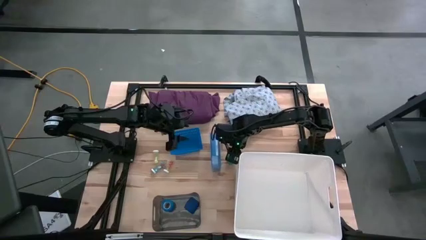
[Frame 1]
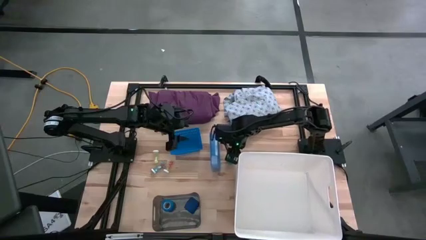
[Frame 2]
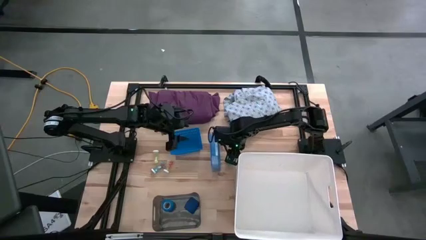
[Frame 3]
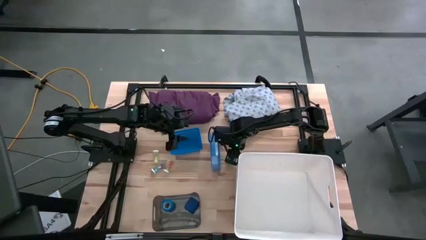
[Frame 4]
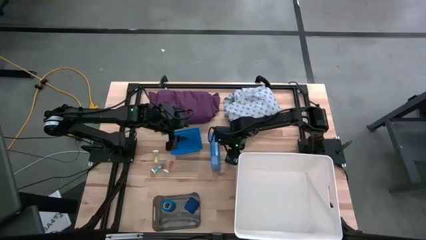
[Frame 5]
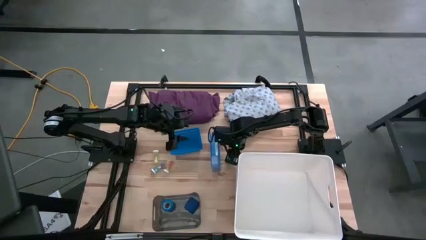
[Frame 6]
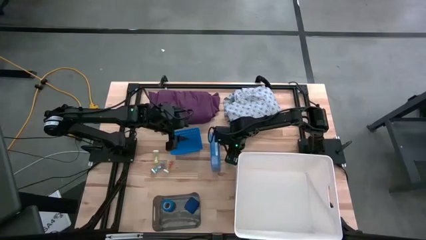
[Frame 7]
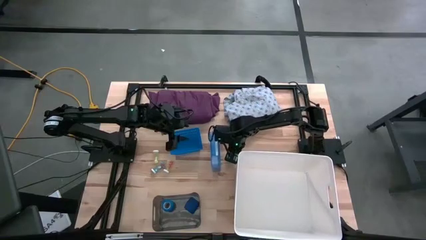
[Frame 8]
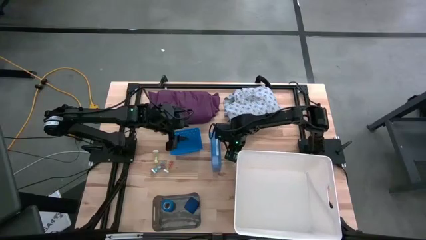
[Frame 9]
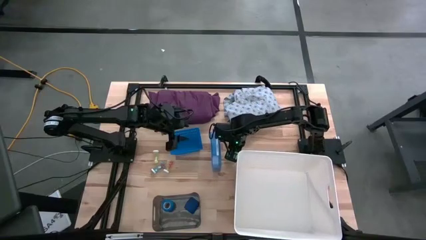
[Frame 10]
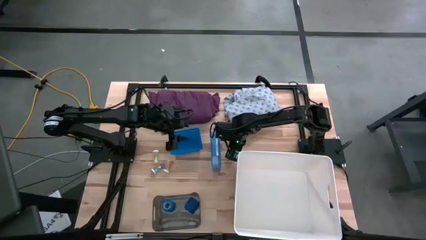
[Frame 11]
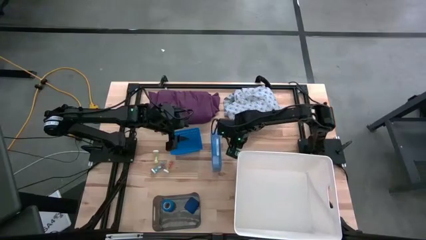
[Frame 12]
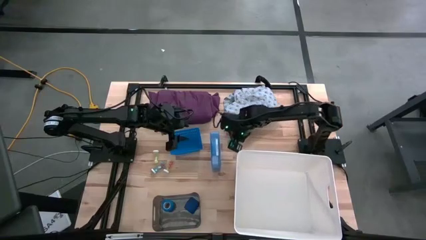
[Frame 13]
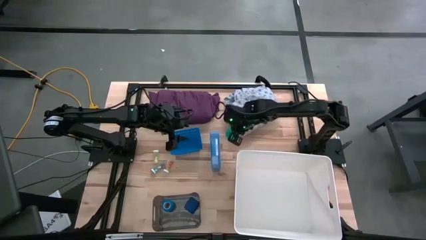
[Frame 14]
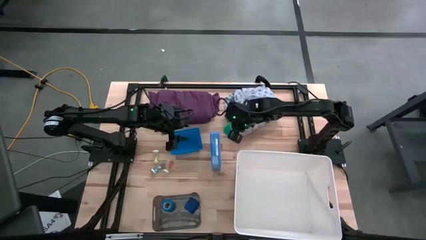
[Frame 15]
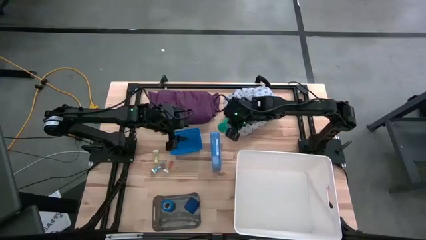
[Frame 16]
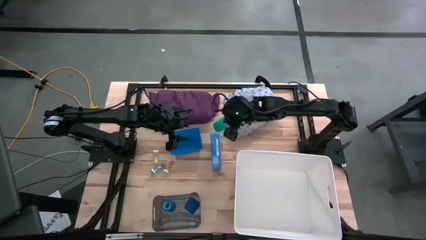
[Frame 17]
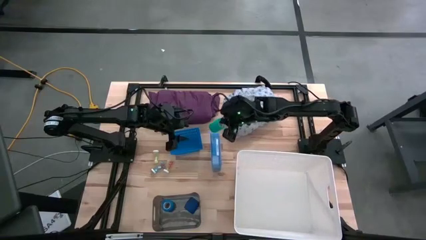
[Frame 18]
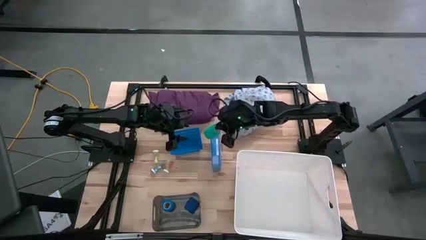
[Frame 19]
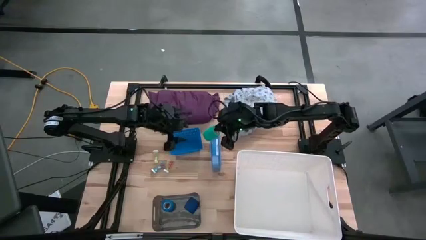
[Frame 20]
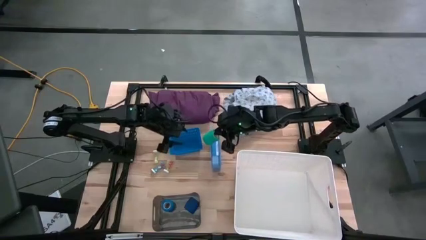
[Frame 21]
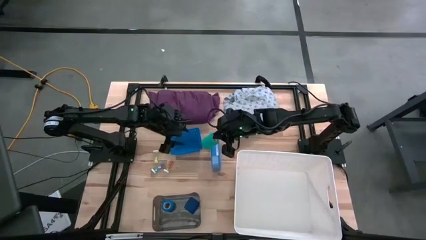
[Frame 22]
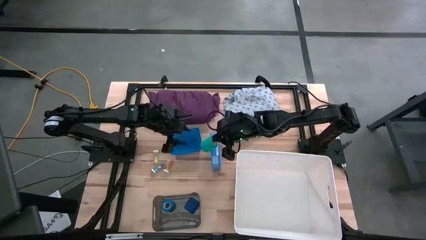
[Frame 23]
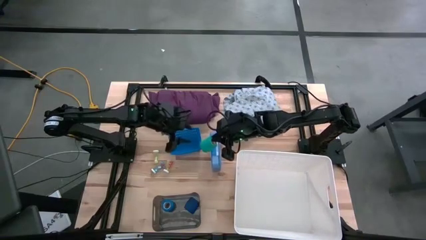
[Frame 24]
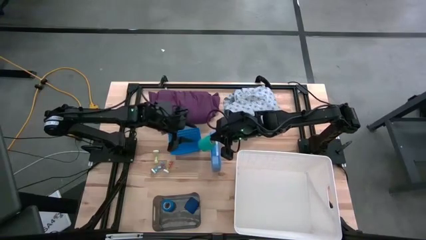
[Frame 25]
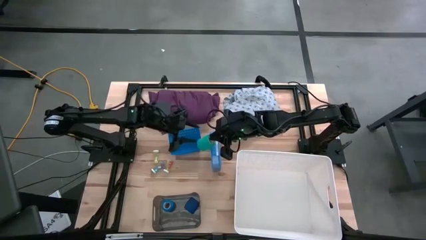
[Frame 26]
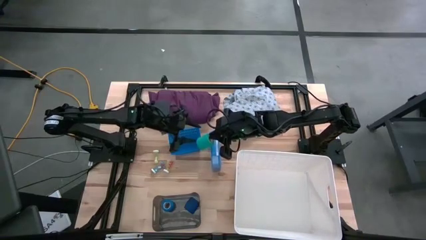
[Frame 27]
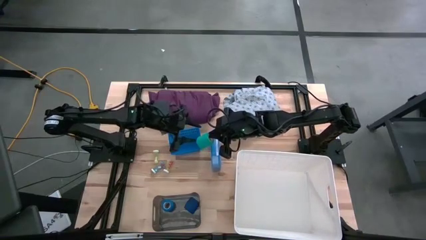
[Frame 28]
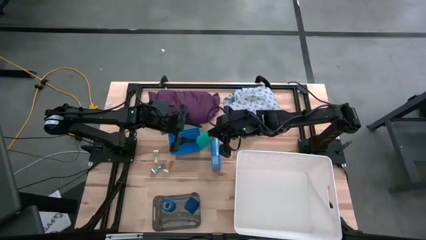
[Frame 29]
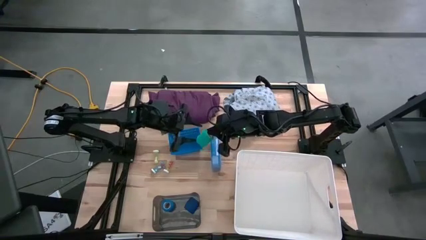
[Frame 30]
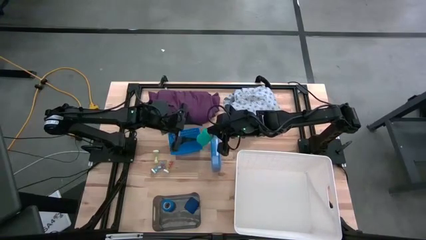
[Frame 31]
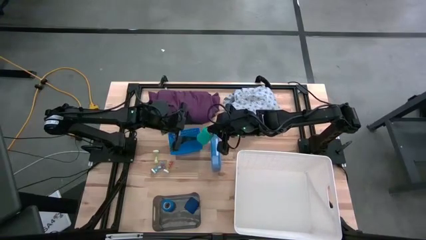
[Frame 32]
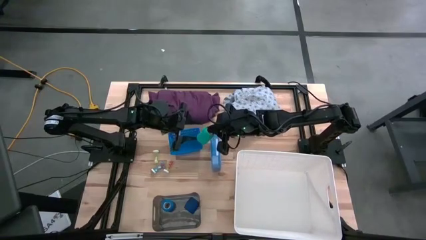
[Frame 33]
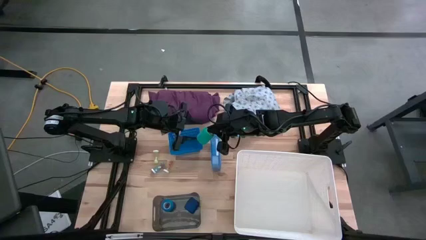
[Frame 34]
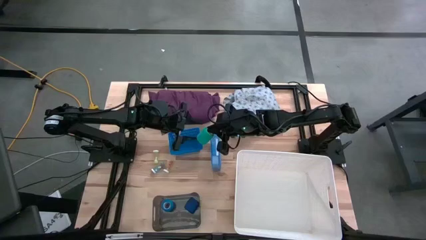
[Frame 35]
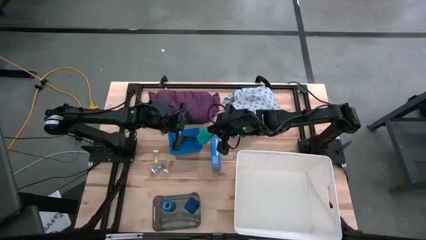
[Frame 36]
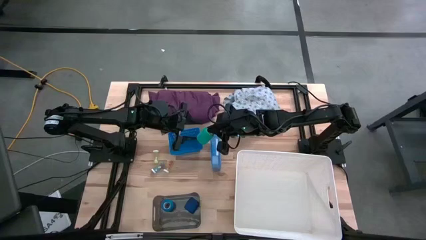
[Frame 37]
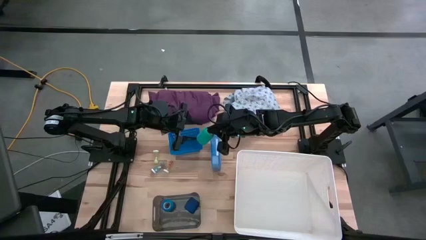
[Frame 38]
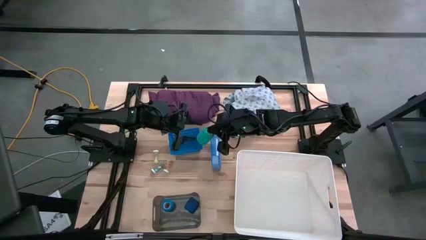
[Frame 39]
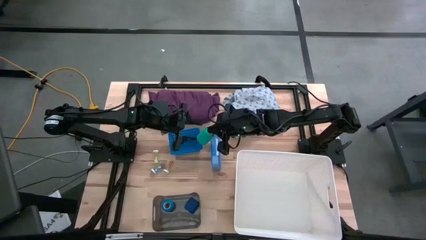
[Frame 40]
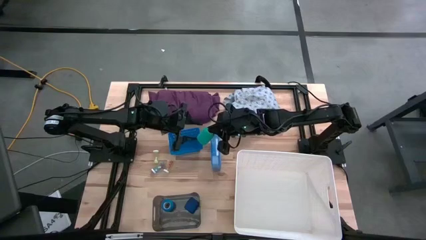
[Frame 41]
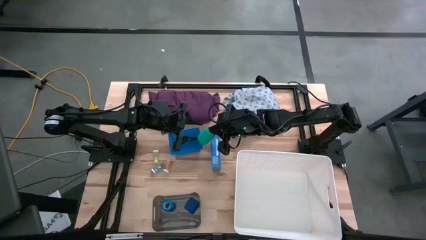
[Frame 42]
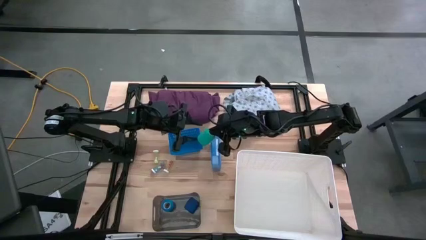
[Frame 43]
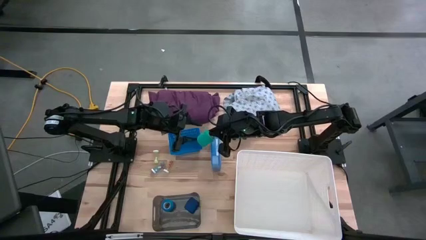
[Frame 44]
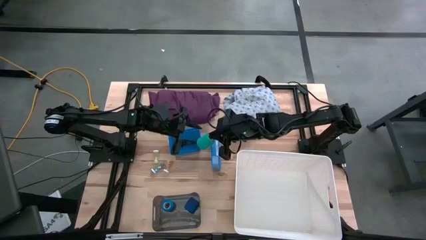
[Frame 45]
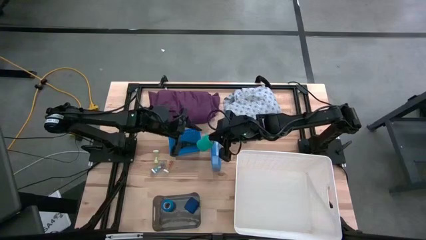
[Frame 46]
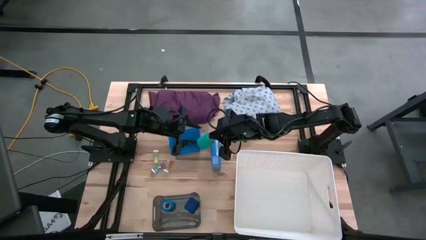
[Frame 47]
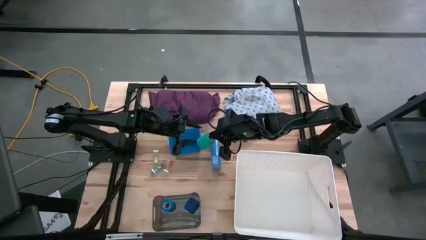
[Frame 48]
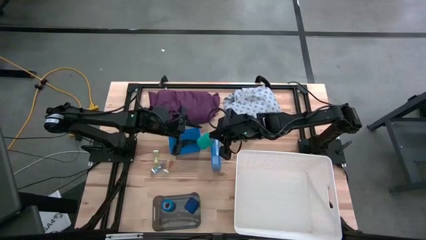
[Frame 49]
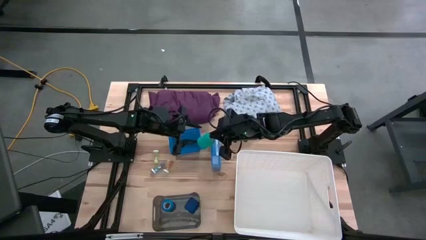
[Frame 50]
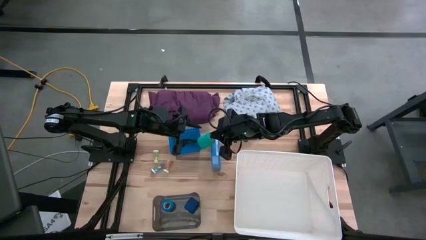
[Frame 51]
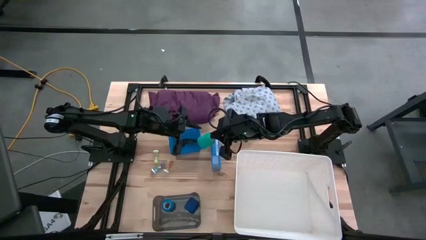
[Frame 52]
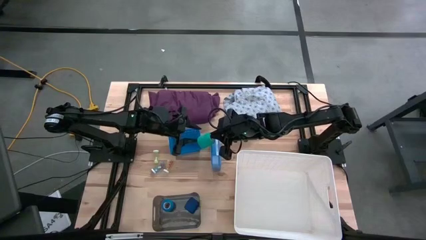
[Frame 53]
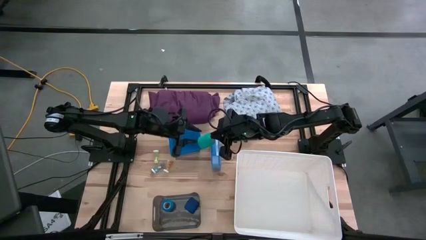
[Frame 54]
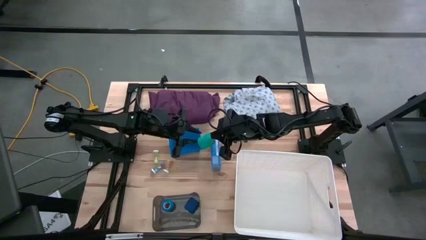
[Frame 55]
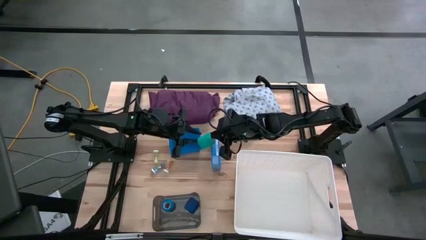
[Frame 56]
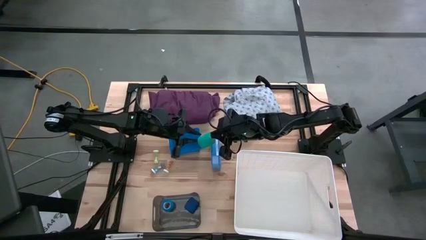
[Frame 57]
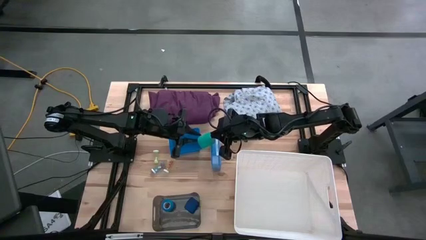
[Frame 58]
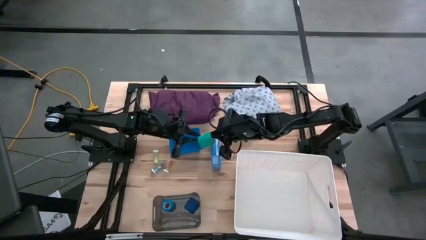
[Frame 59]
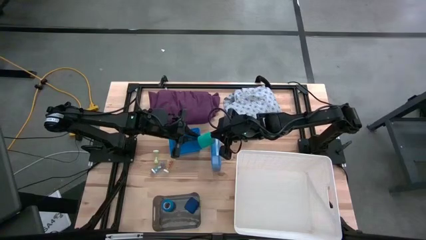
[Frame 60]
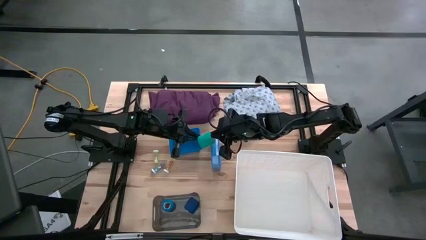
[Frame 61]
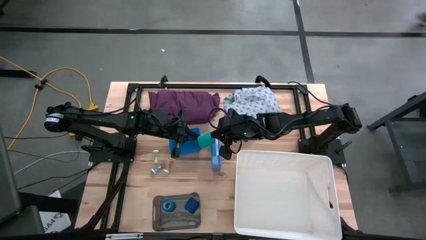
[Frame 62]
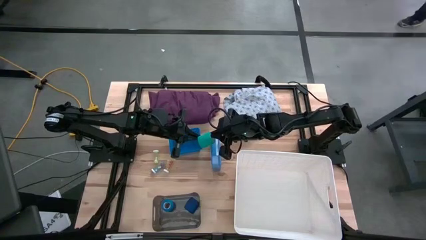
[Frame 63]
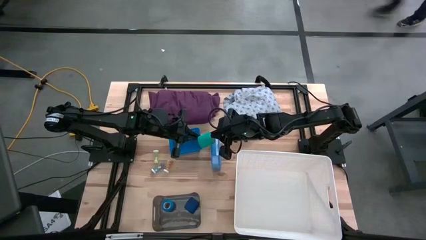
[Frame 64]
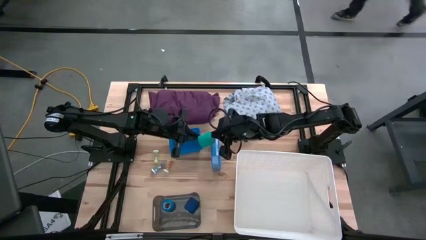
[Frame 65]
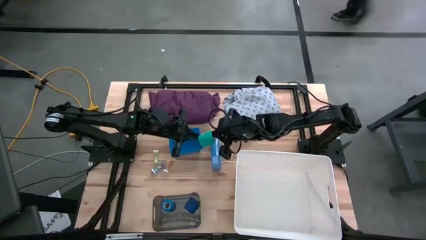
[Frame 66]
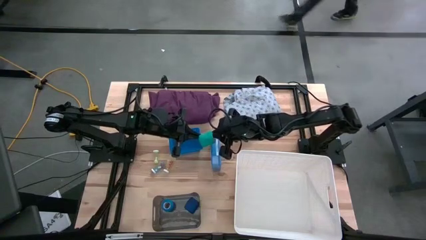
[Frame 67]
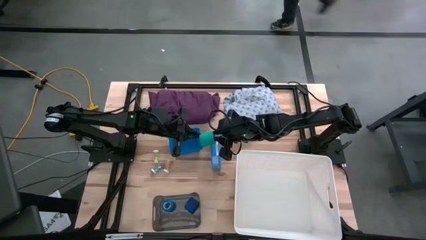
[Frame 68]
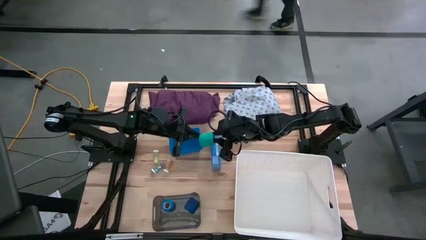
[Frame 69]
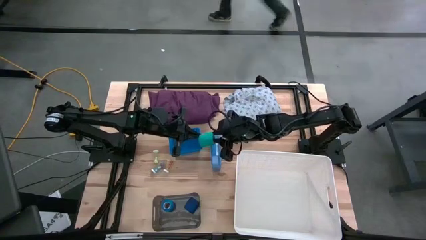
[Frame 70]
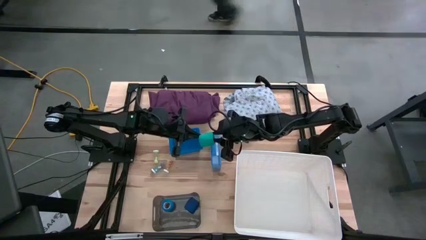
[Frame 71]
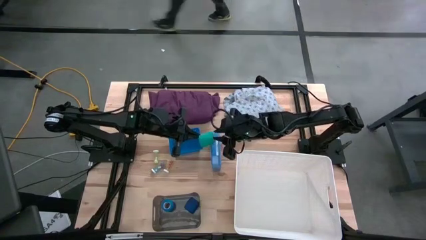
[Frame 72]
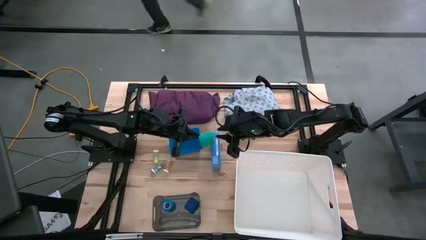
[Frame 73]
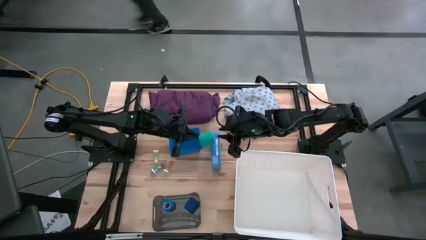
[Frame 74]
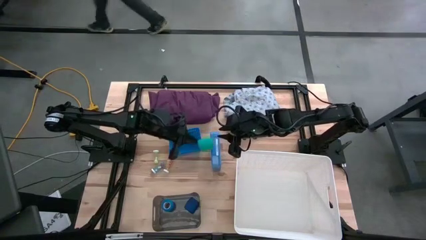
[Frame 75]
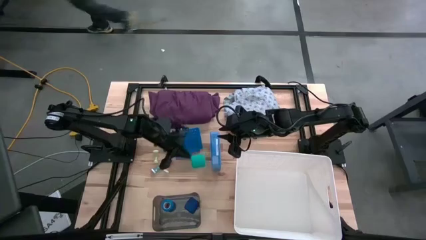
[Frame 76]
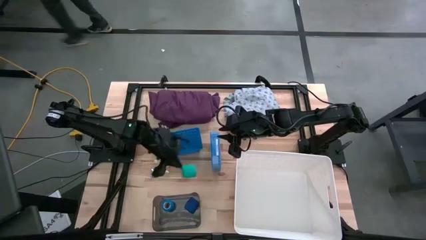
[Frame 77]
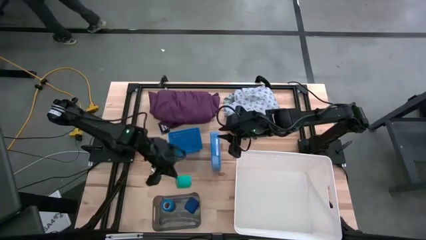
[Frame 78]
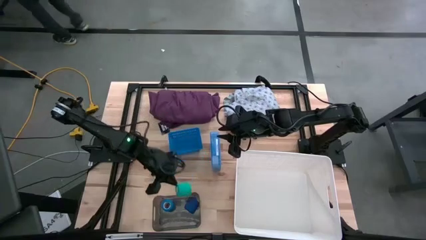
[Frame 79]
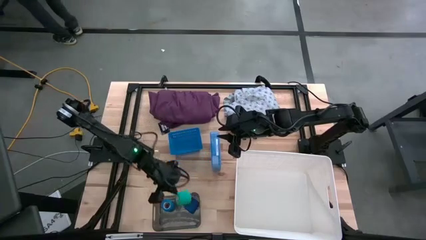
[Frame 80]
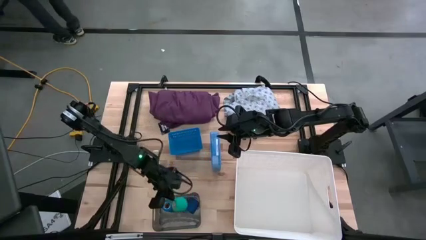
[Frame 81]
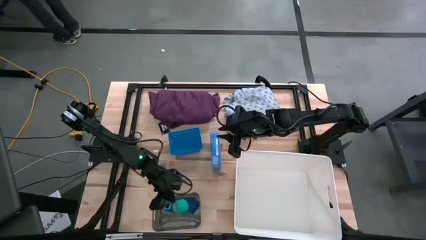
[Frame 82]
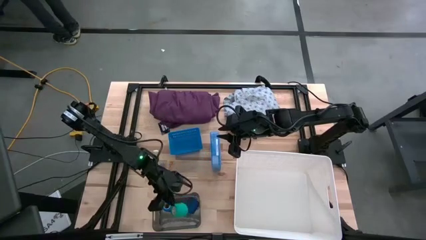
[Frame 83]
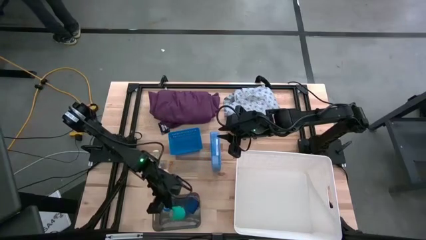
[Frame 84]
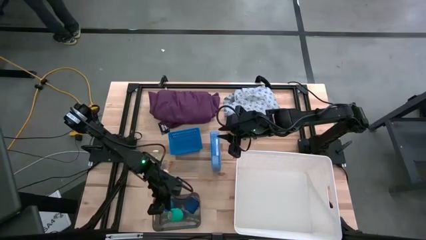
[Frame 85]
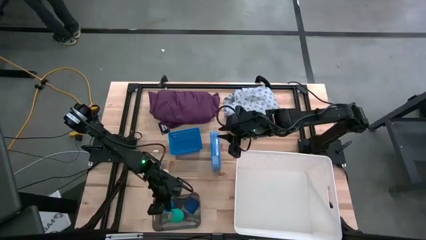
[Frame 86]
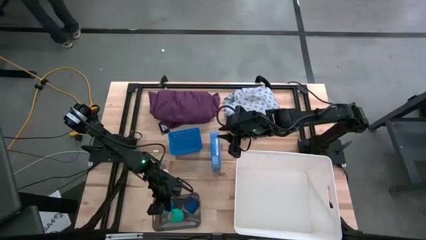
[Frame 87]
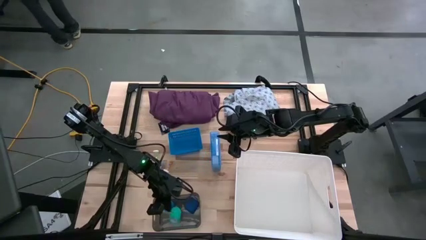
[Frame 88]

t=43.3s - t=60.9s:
Task: Pick & Place Medicine items
Put the green bandage into the black bin
